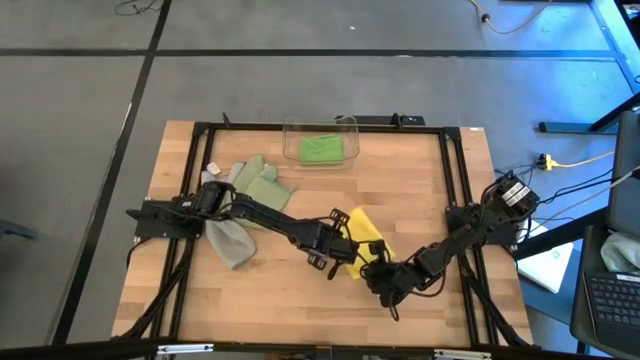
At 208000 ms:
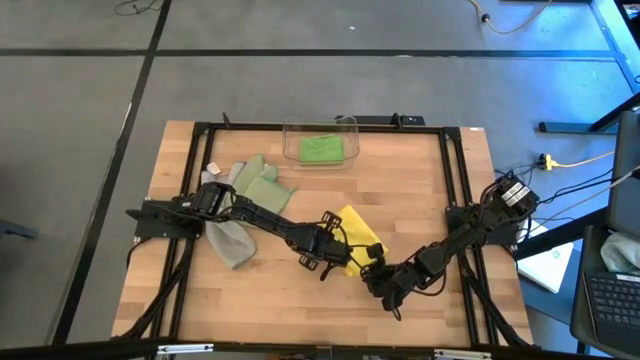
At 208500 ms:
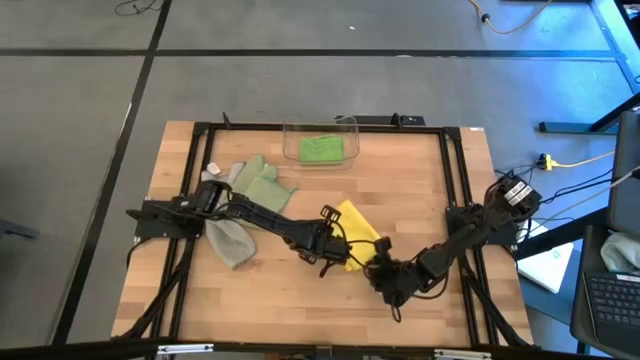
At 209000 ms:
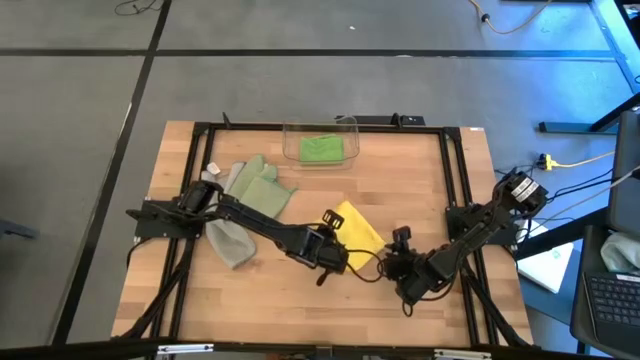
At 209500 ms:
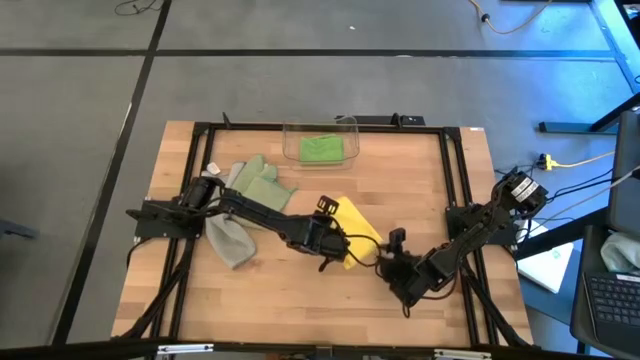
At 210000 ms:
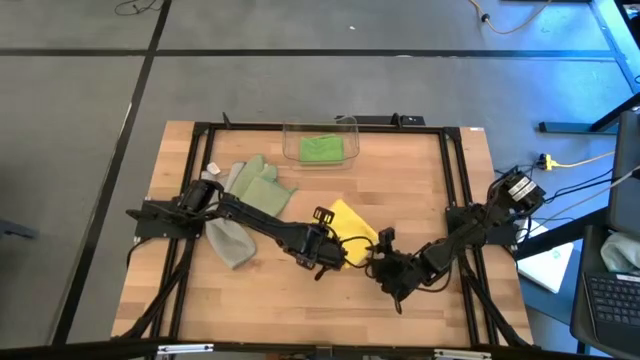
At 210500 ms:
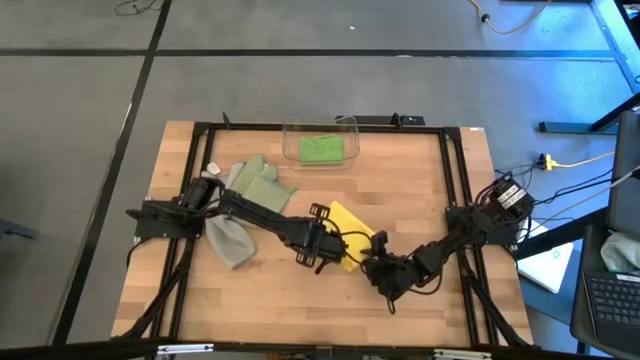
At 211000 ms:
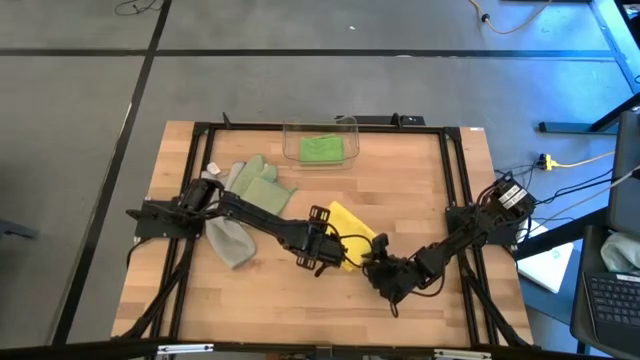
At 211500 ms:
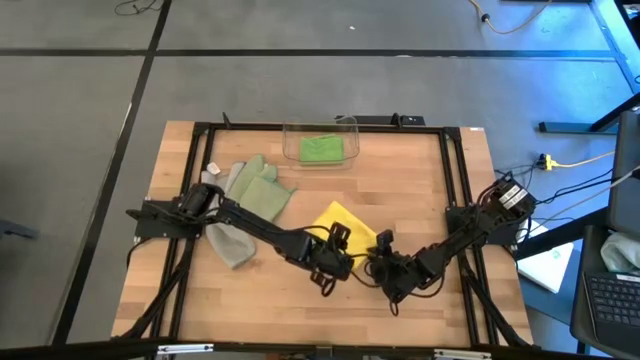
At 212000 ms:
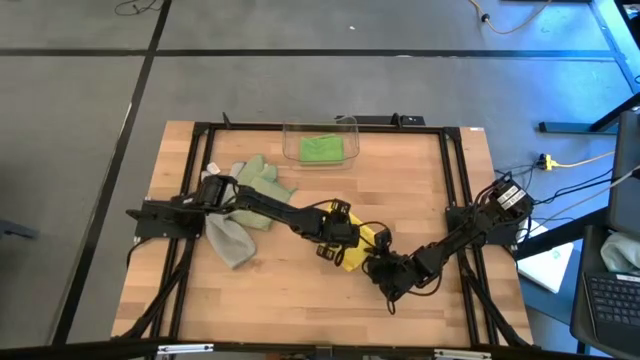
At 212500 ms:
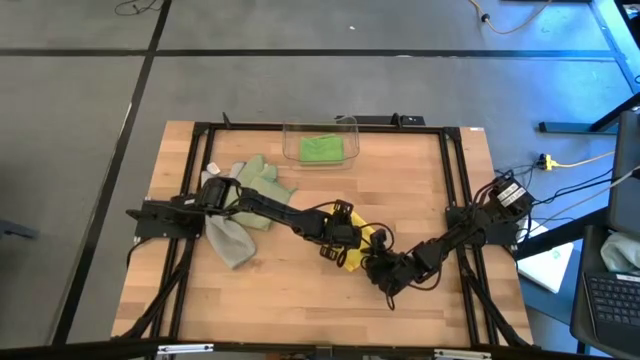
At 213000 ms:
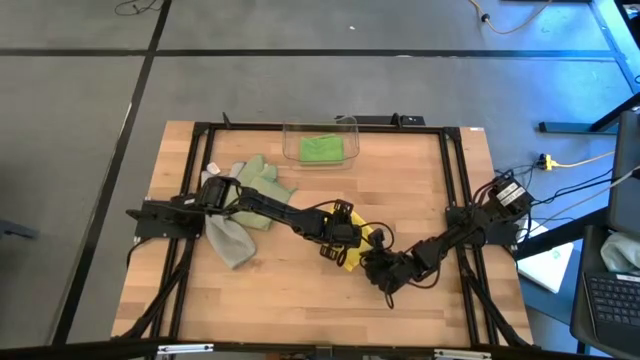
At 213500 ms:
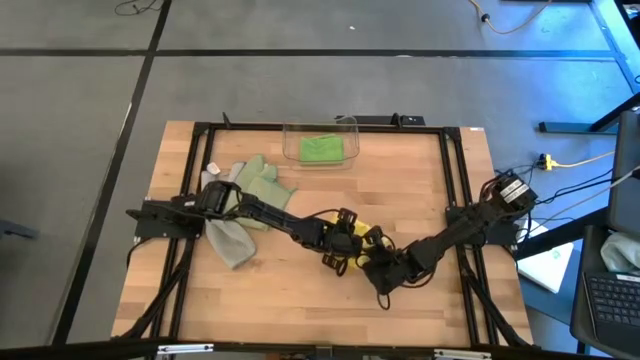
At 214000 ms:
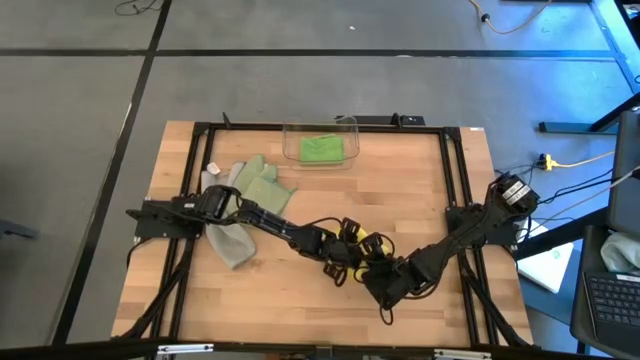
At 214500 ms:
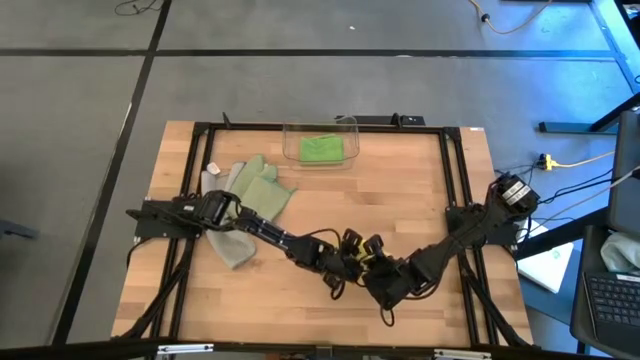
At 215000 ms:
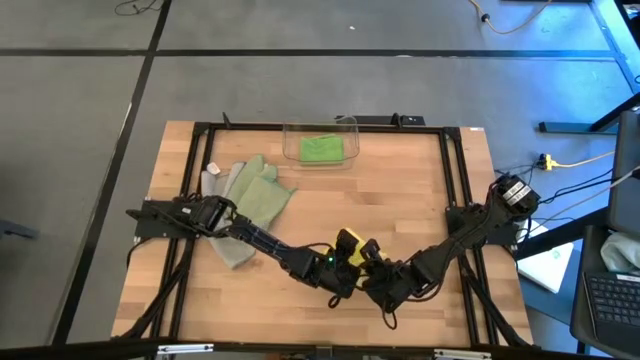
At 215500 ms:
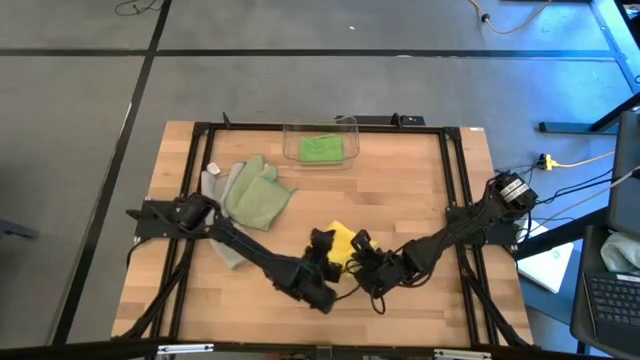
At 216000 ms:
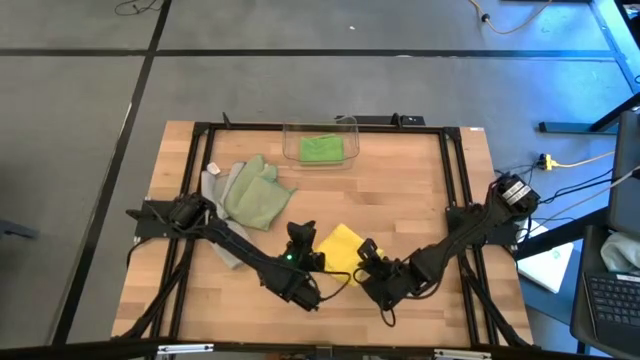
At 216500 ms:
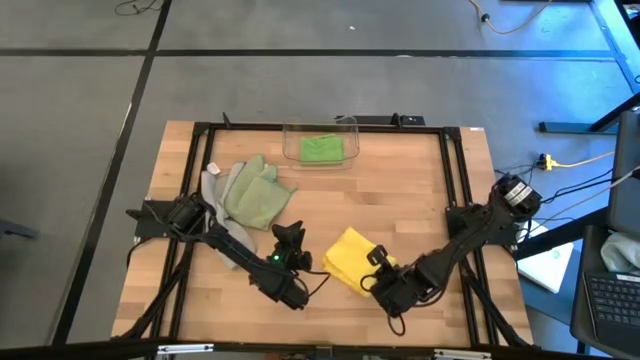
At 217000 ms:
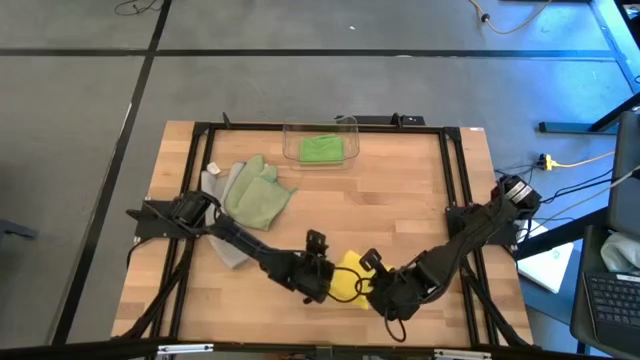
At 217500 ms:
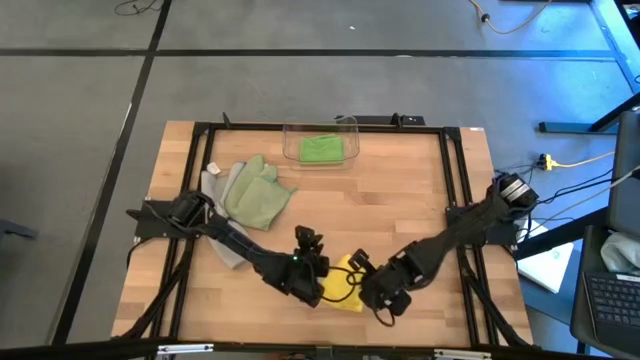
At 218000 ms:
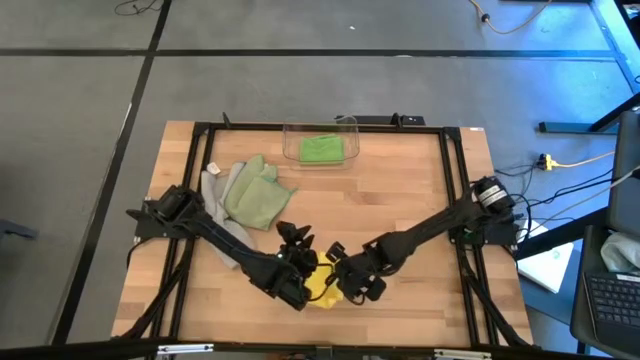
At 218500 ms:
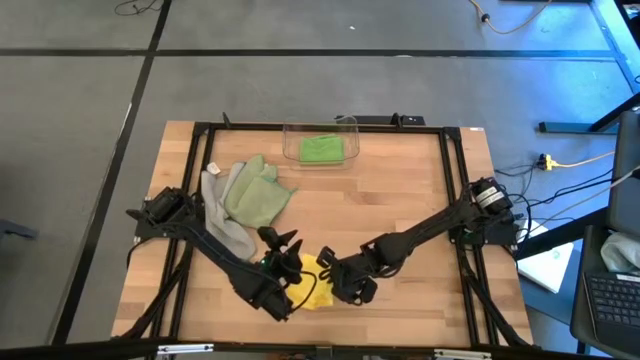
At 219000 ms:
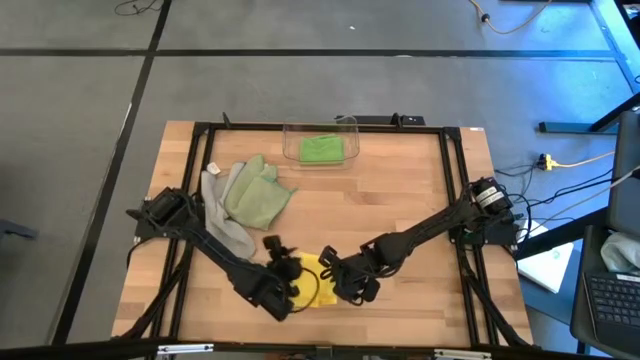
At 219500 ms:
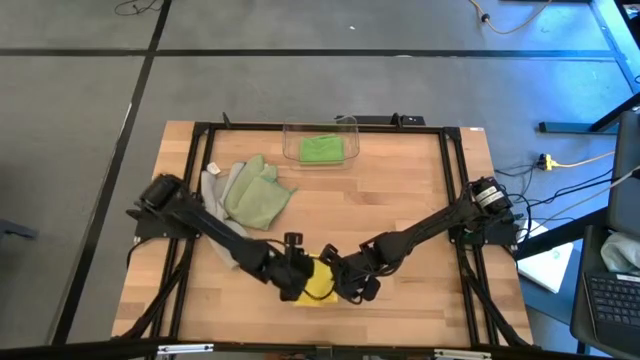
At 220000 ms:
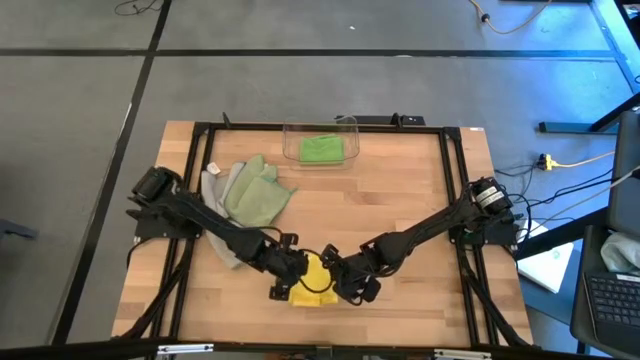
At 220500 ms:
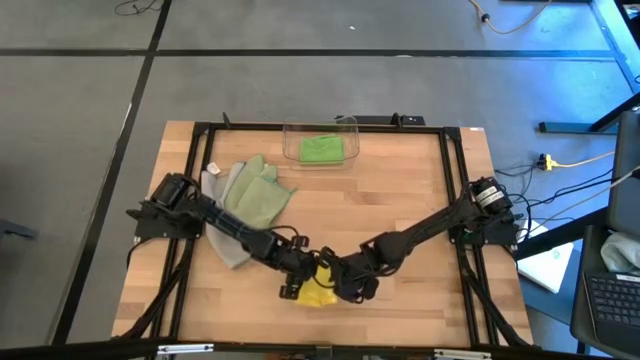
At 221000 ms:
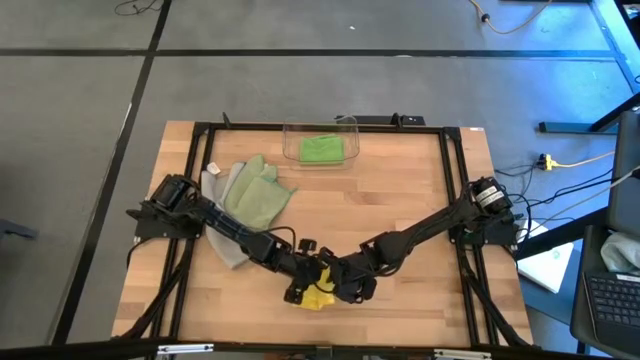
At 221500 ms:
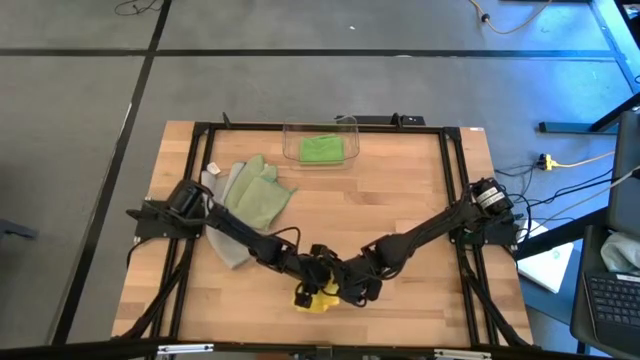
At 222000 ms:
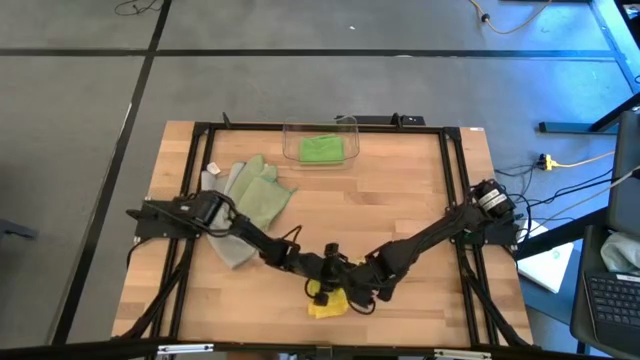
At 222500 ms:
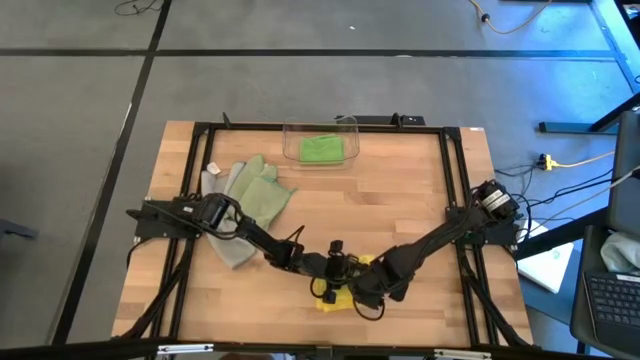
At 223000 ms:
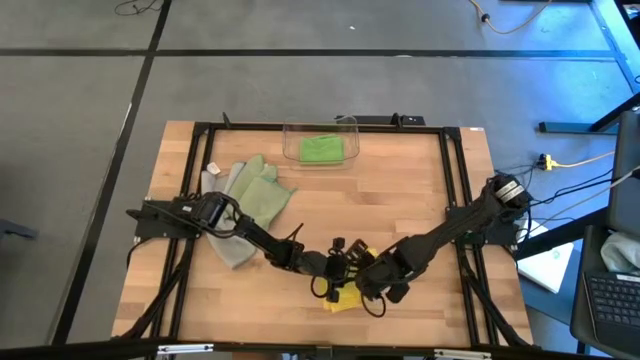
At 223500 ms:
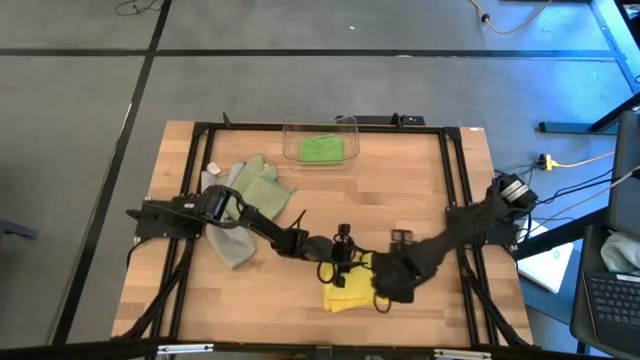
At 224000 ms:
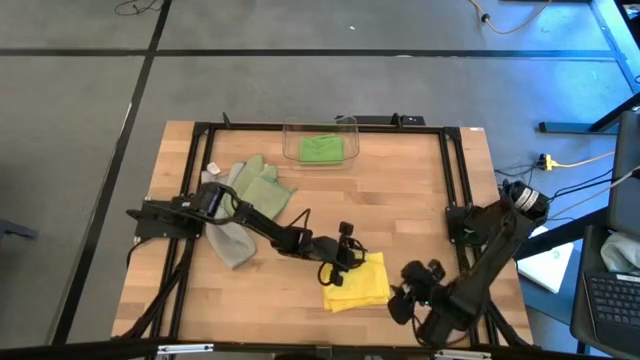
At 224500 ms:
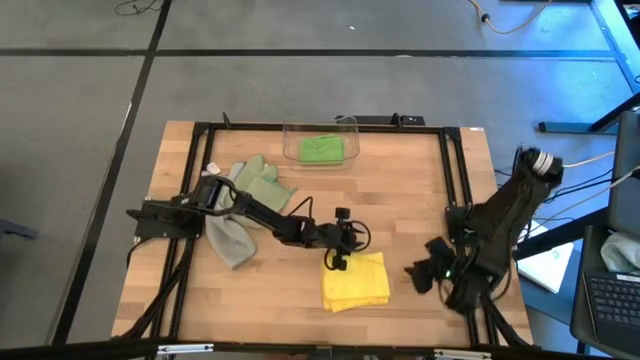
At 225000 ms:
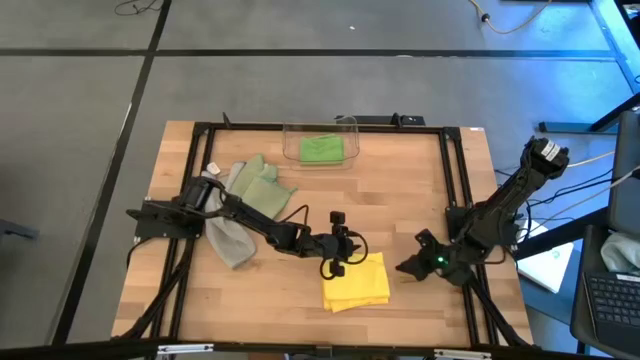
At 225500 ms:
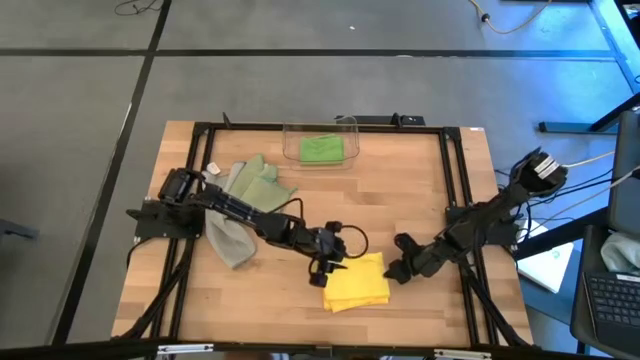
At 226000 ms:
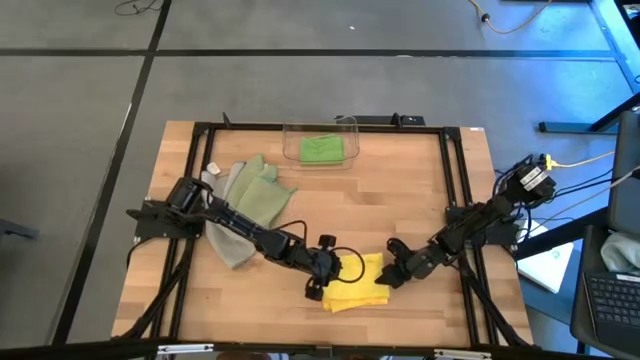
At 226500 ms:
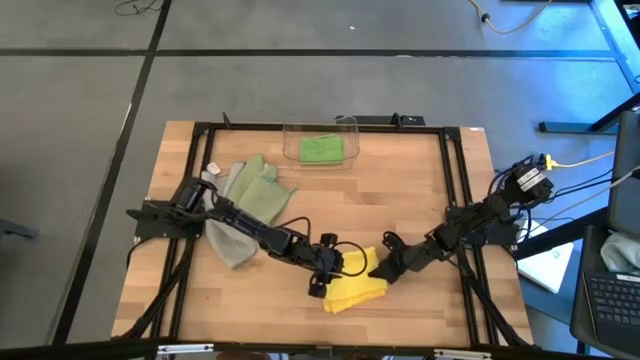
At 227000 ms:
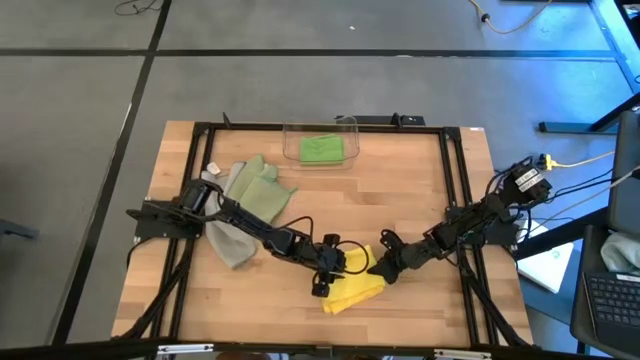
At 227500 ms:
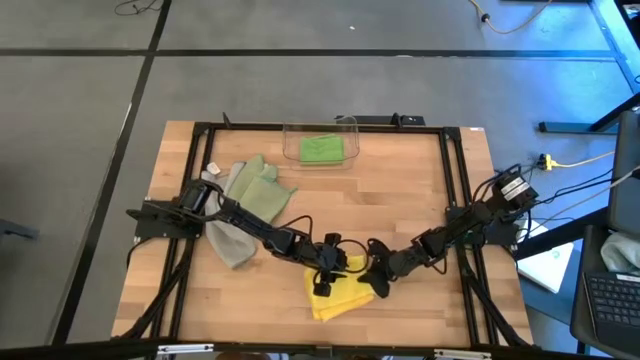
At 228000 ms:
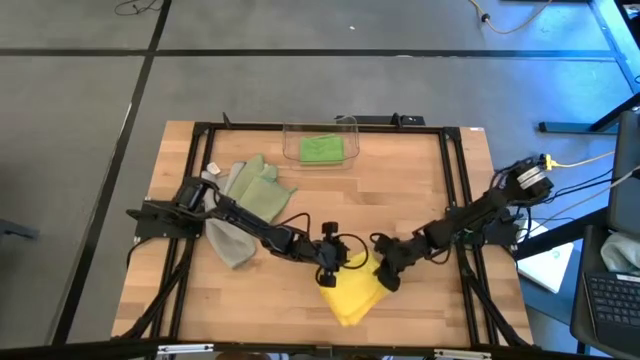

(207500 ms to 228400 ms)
Task: Fold microfiber towels
Fold the yellow microfiber cloth

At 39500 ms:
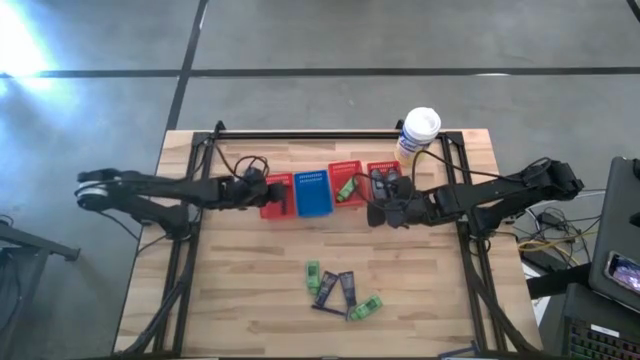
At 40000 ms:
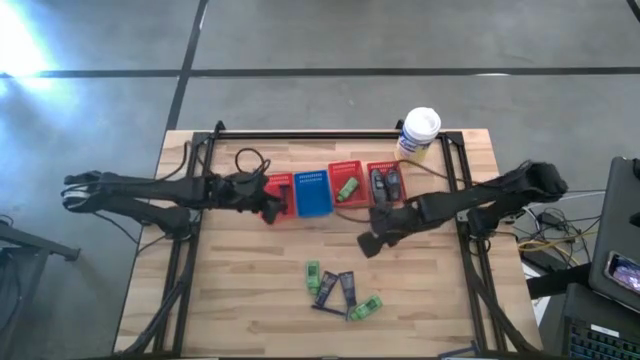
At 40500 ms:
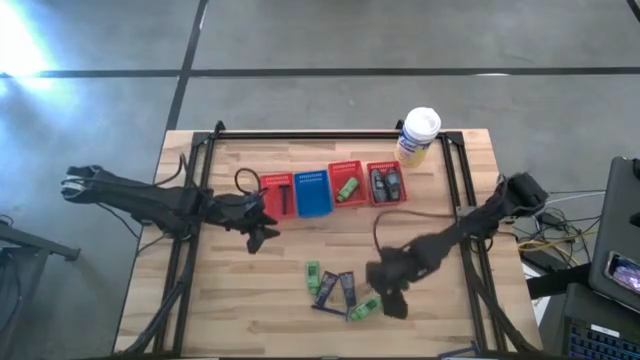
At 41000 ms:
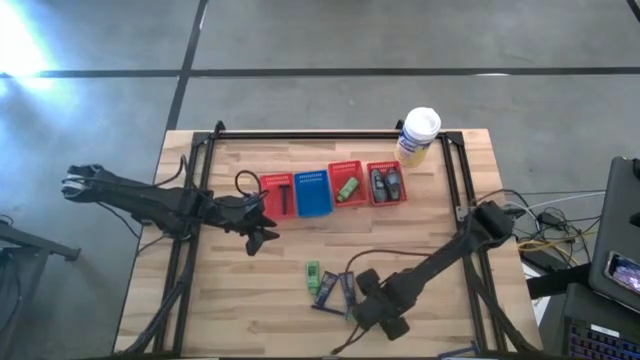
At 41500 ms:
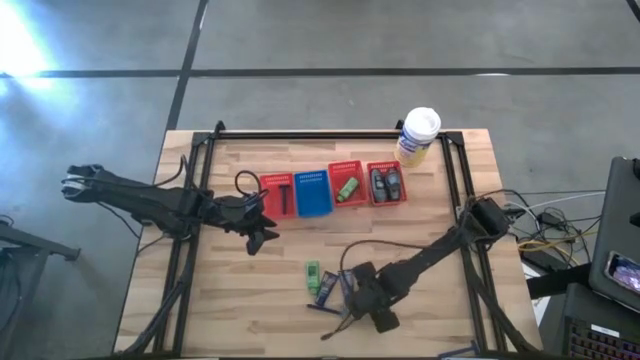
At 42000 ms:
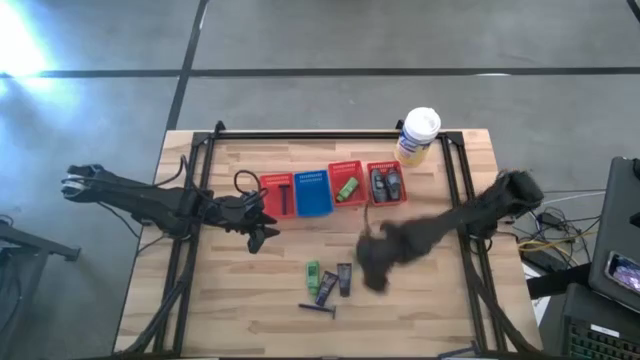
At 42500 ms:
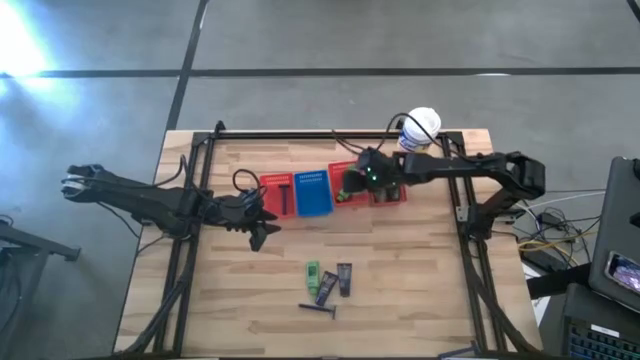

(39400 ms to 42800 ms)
Task: Pick & Place Travel size toiletries
Put the green shampoo into the middle red bin
